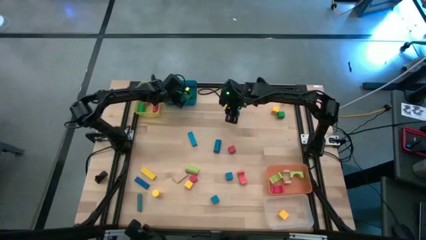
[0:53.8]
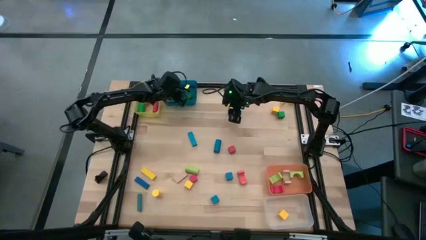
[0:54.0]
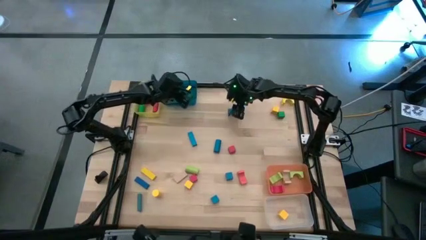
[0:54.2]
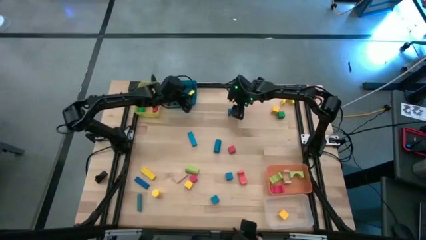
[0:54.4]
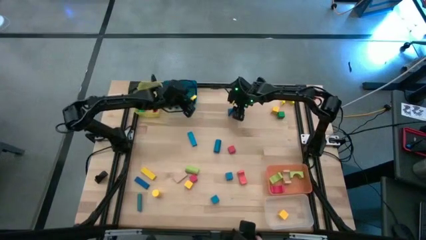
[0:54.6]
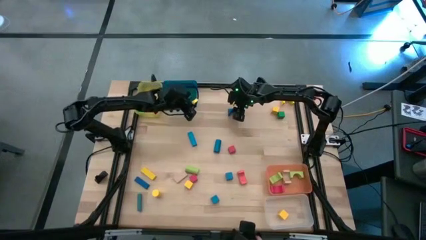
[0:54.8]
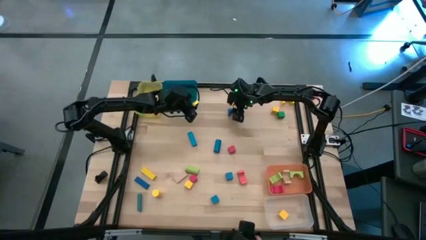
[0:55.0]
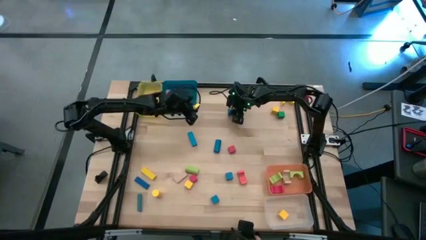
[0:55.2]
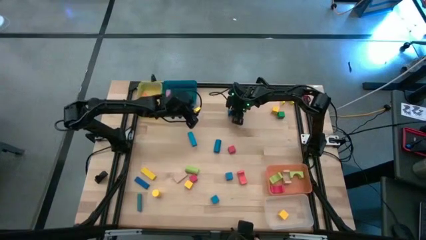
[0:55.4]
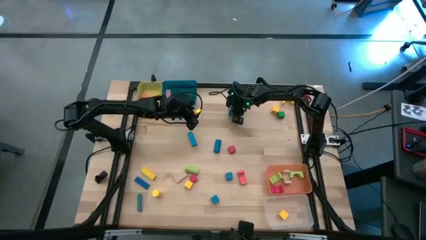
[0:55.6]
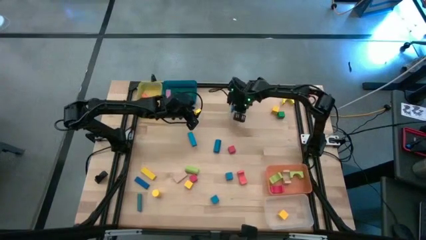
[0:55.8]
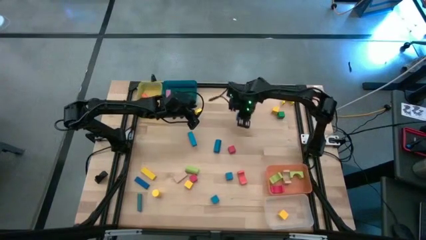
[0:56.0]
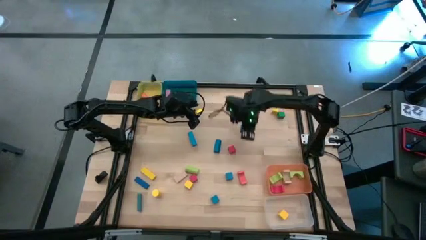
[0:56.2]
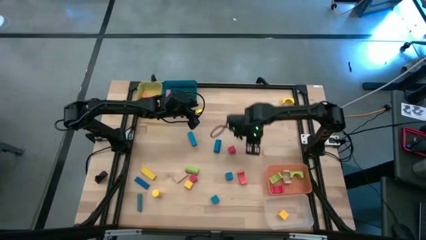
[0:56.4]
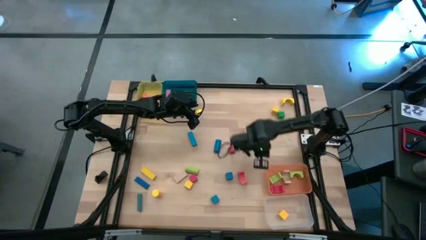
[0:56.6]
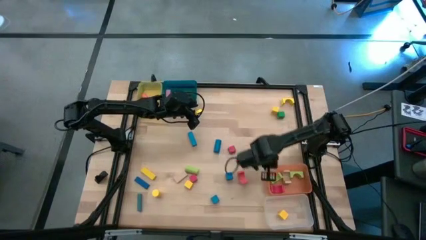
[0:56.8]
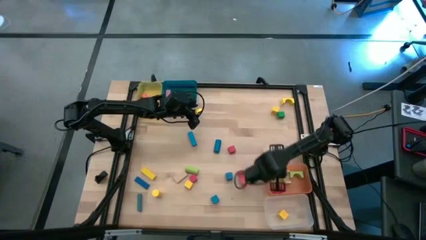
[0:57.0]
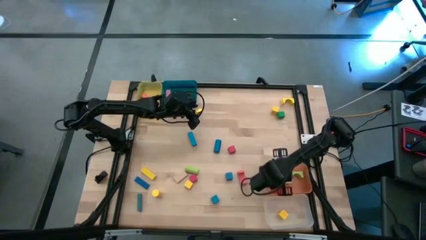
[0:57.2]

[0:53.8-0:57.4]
Task: Sort blocks by size
Put the blue arch block into the orange bin

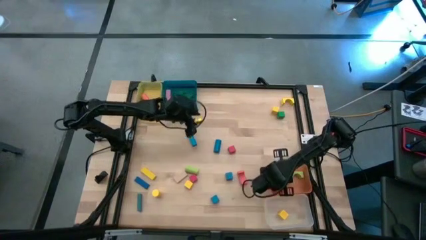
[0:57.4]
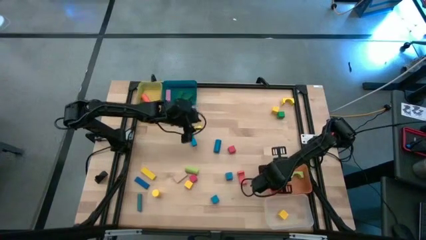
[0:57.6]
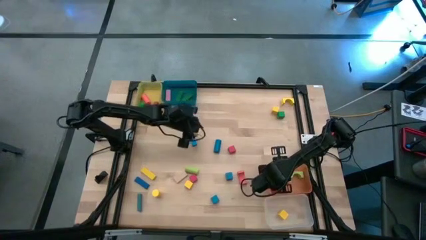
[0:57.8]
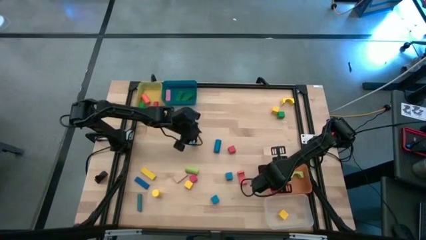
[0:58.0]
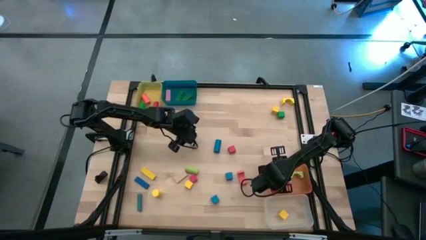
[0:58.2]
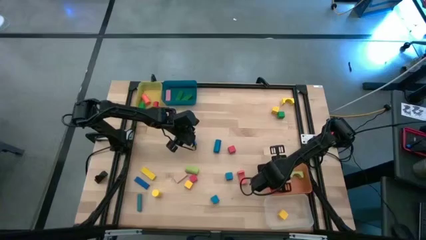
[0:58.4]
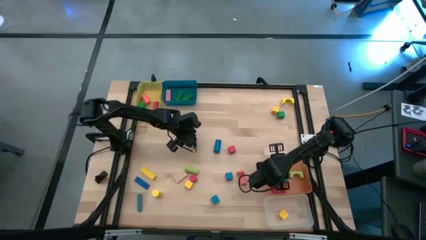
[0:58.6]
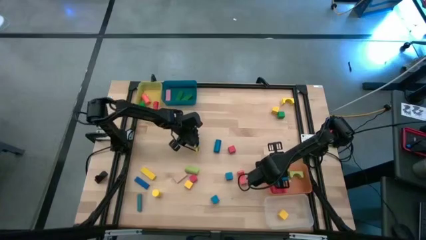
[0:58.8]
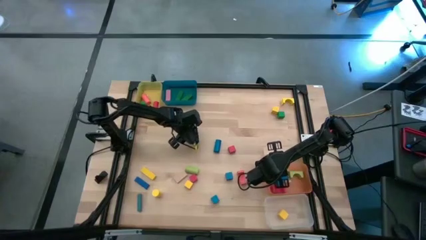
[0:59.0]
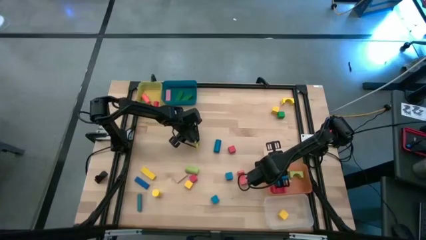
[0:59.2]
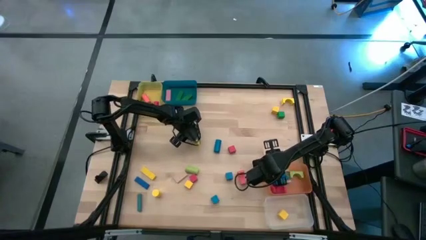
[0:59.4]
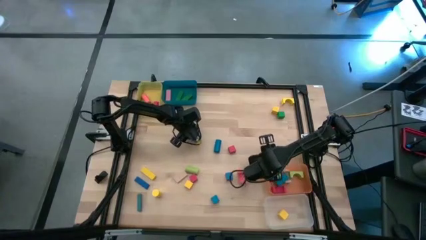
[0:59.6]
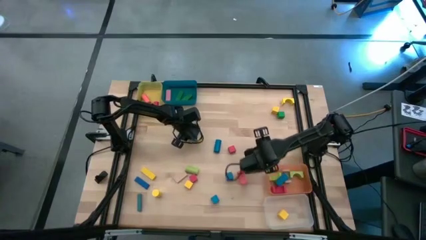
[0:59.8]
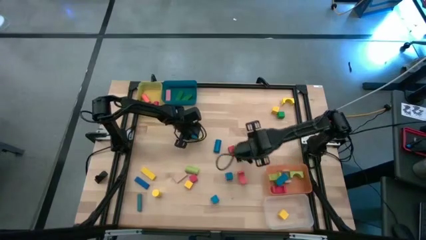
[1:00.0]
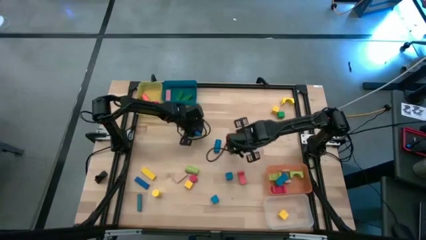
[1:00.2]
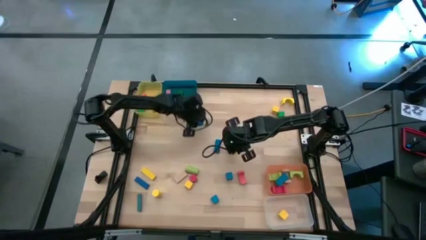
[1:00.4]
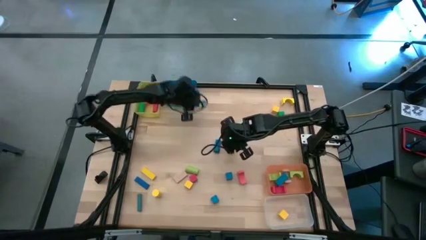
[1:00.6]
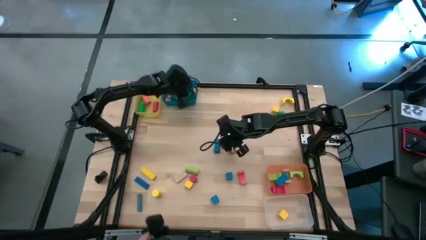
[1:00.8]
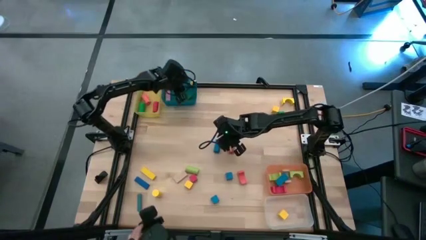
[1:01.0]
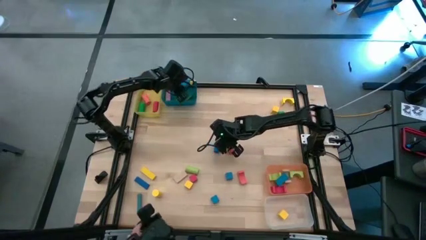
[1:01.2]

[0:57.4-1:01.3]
Put the blue rectangular block into the blue bin

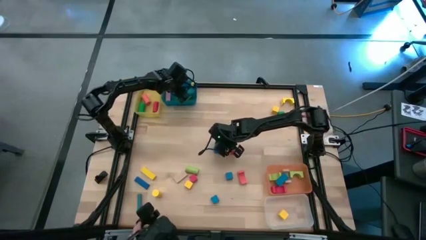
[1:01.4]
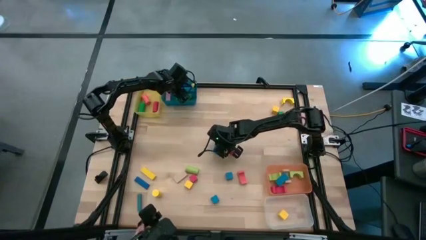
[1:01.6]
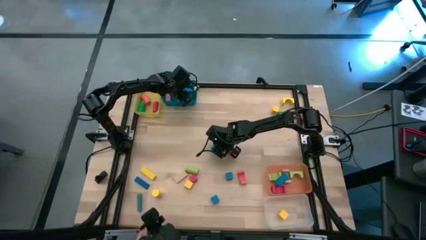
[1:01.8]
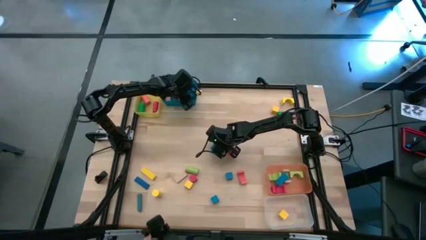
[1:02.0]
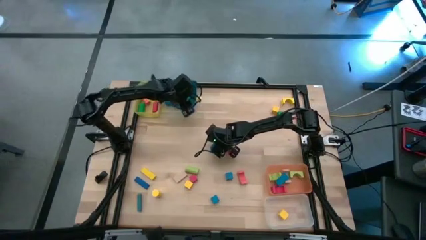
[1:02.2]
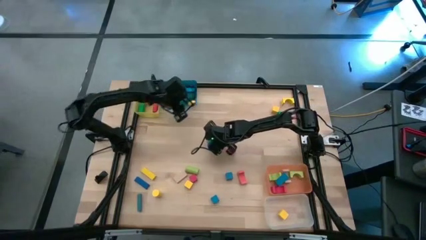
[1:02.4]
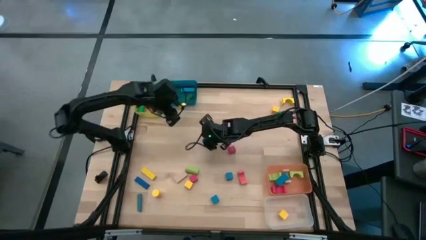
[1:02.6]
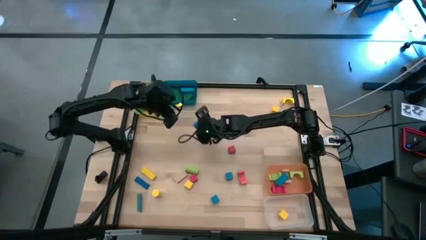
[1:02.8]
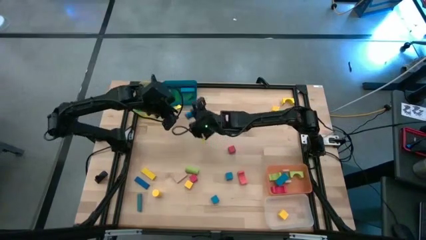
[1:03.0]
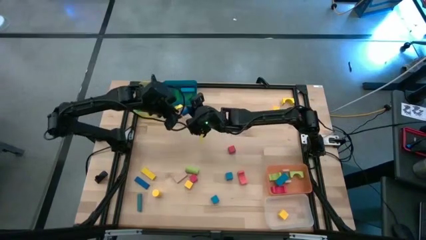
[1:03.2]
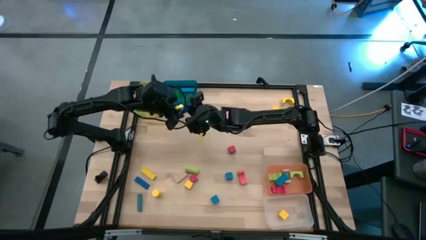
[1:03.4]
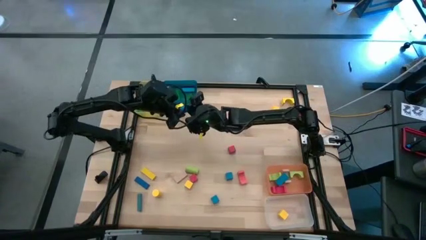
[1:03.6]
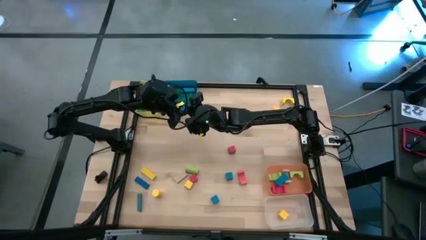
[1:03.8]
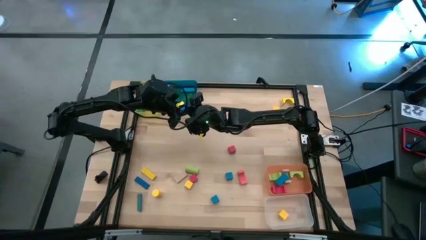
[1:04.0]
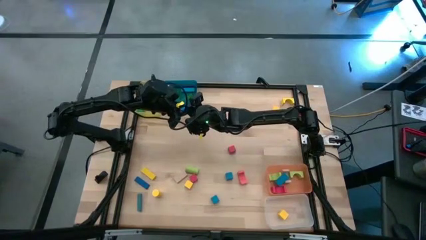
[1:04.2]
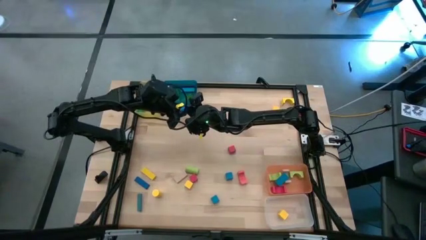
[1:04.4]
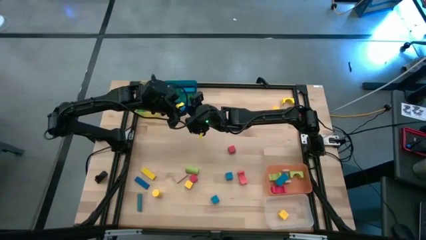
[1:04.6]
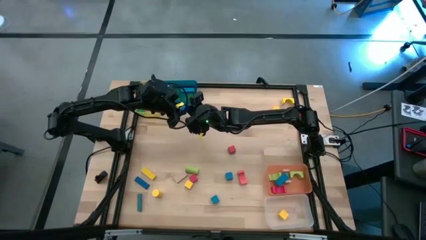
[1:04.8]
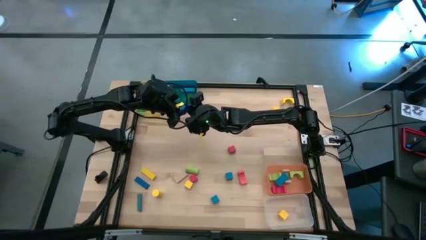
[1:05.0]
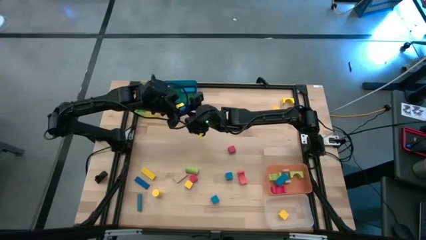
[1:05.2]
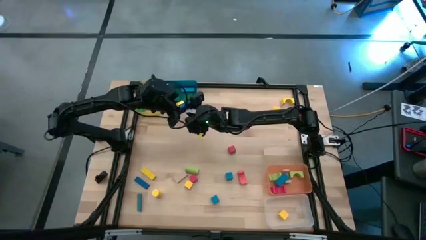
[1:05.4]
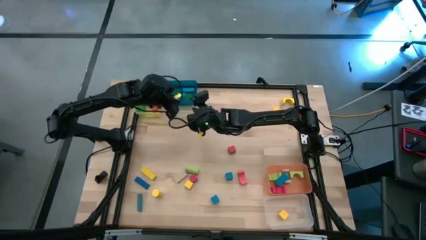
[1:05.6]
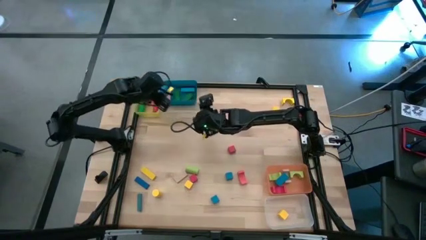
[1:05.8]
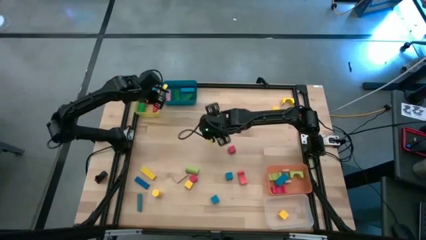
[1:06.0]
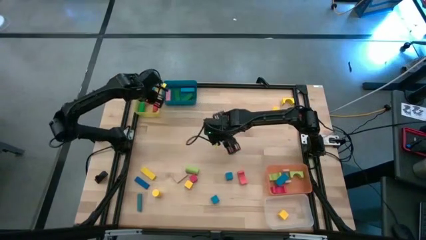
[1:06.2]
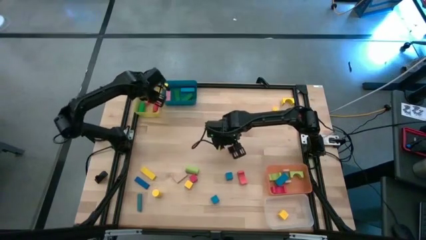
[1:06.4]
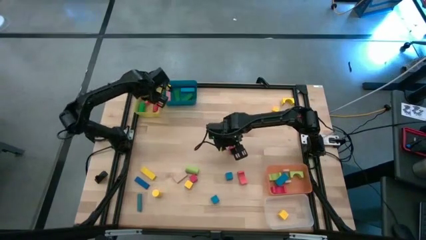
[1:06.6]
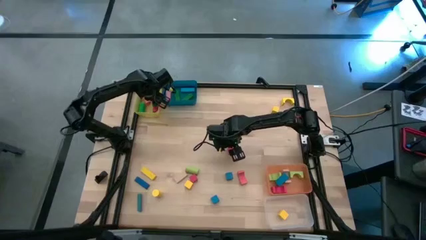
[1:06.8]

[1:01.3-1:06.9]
Put the blue cylindrical block into the yellow bin

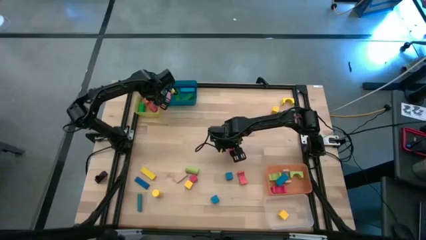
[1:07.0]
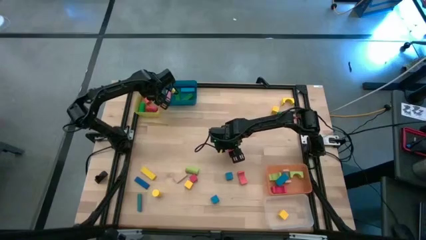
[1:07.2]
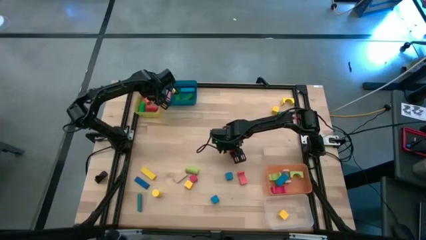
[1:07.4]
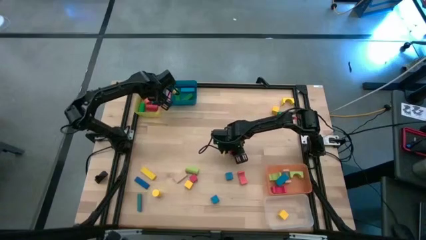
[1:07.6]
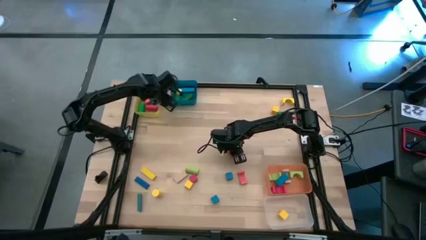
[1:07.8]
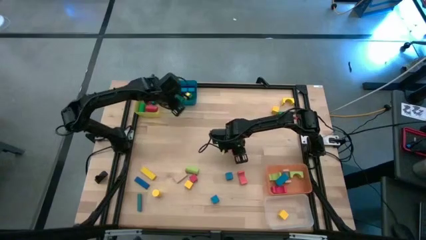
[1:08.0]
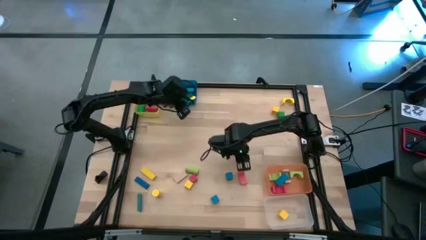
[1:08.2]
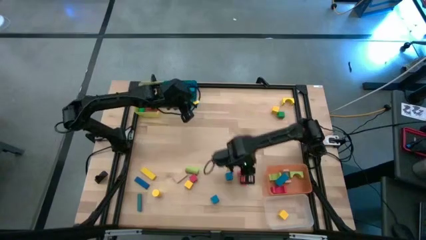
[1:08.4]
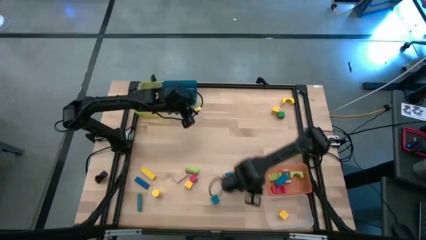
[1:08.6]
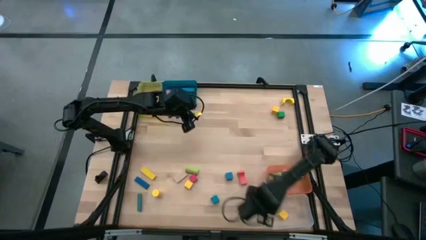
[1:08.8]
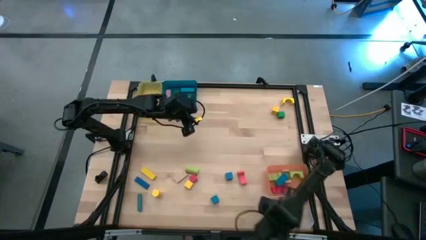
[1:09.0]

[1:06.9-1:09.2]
Put the red square block into the transparent bin

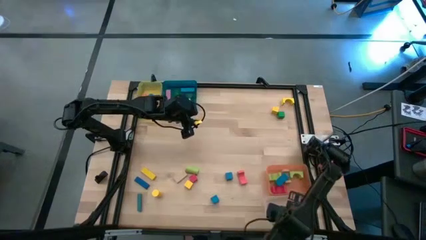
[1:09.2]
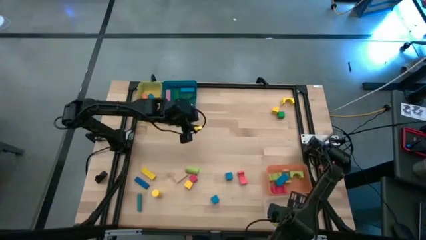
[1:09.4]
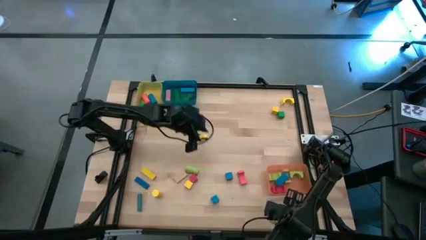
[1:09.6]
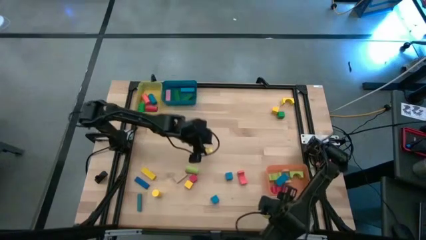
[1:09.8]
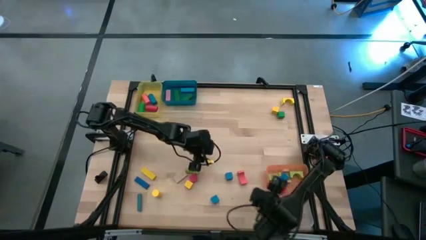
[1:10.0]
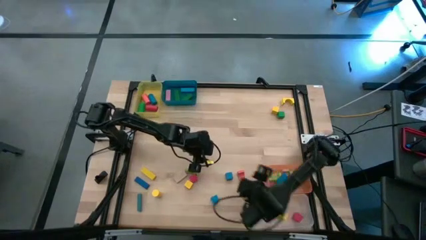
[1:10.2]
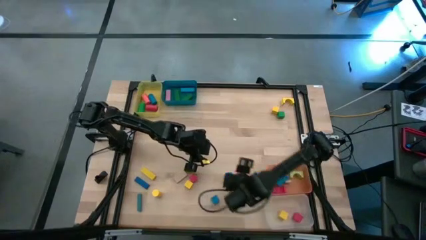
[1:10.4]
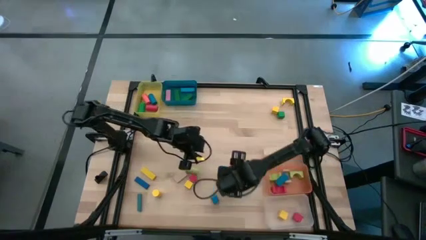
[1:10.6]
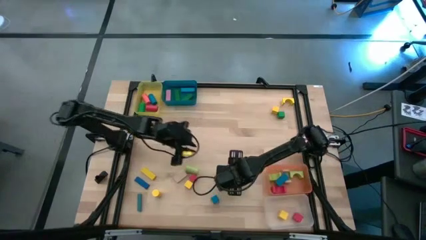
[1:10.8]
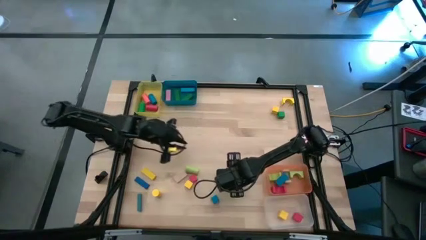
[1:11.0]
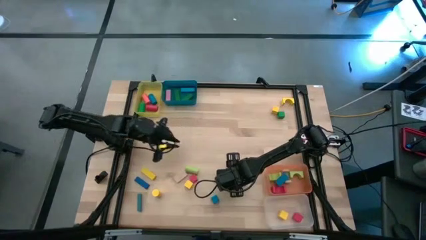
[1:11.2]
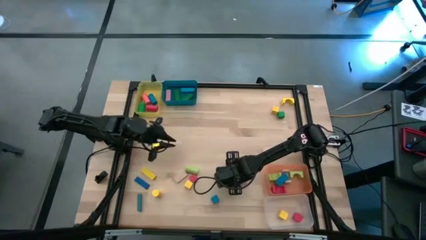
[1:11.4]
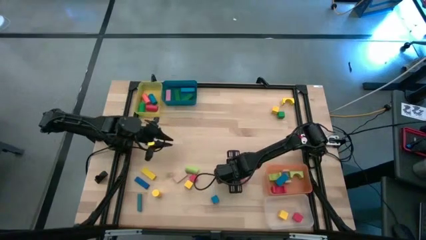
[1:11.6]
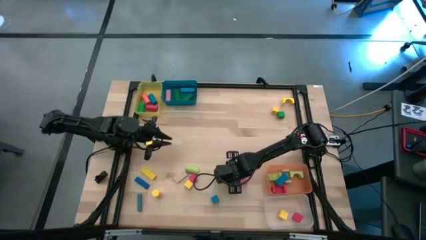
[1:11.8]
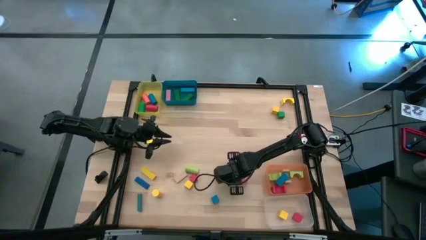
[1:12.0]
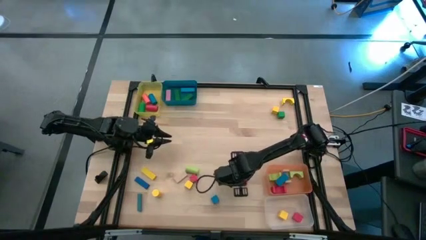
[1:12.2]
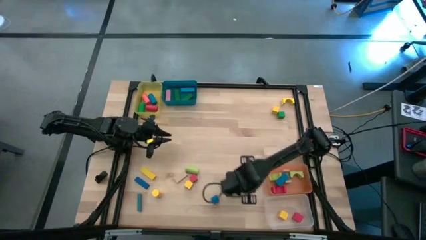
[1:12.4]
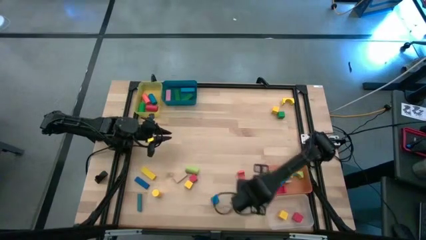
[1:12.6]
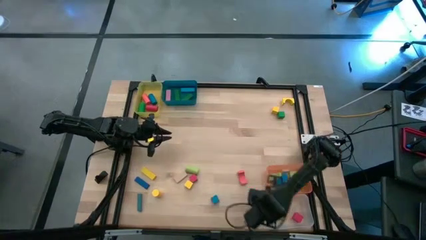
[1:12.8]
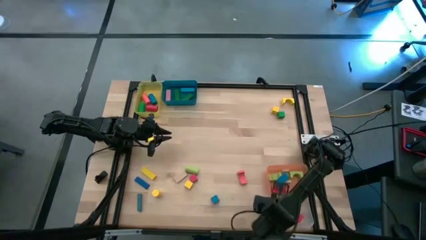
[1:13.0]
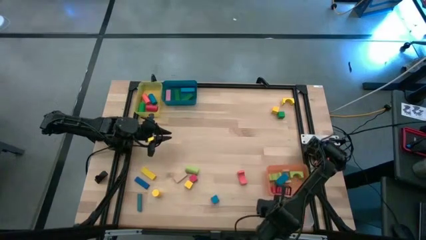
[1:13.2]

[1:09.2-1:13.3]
Put the blue square block into the transparent bin
